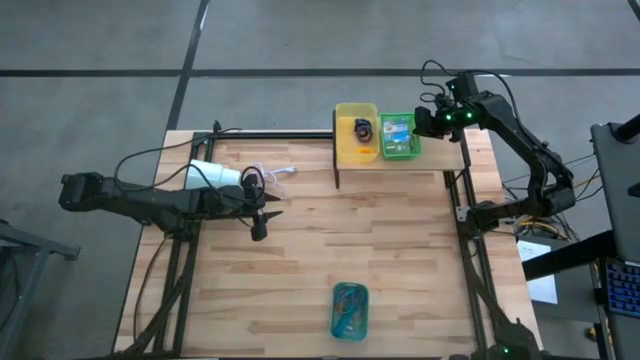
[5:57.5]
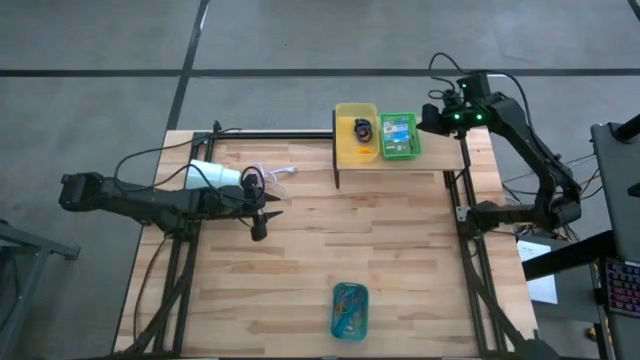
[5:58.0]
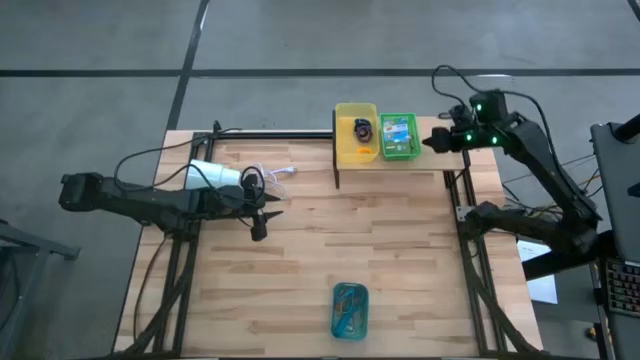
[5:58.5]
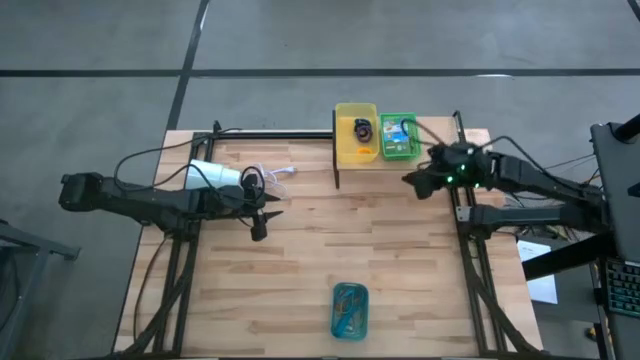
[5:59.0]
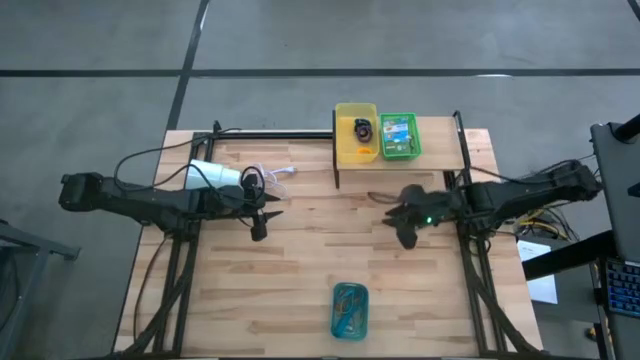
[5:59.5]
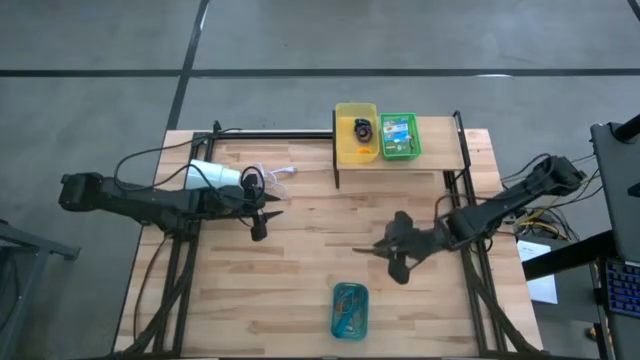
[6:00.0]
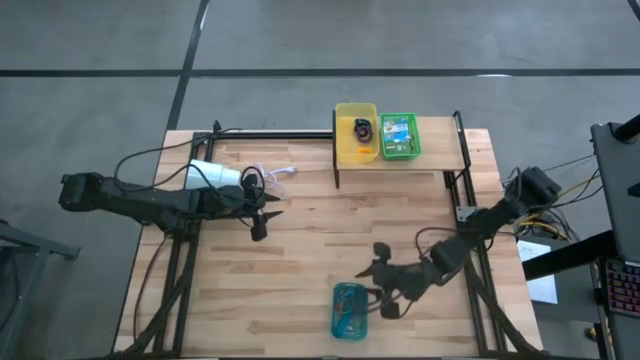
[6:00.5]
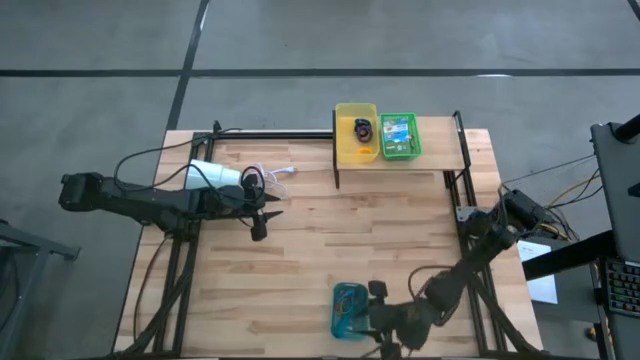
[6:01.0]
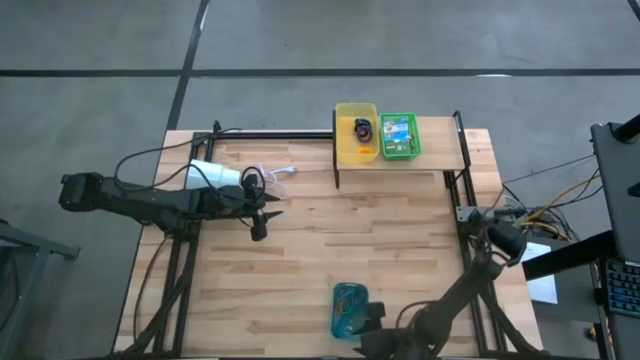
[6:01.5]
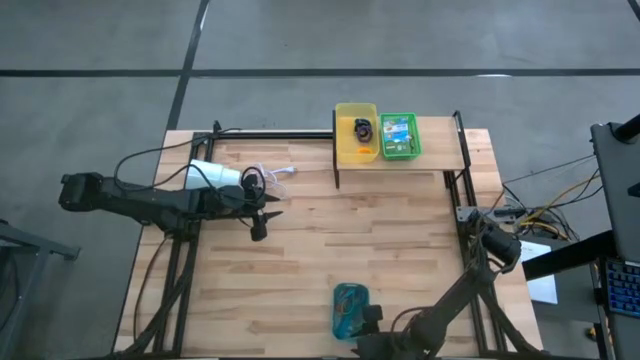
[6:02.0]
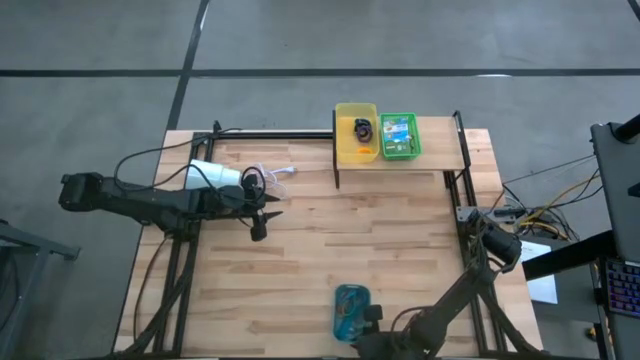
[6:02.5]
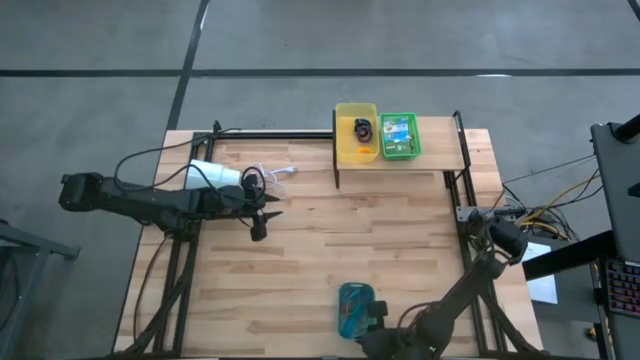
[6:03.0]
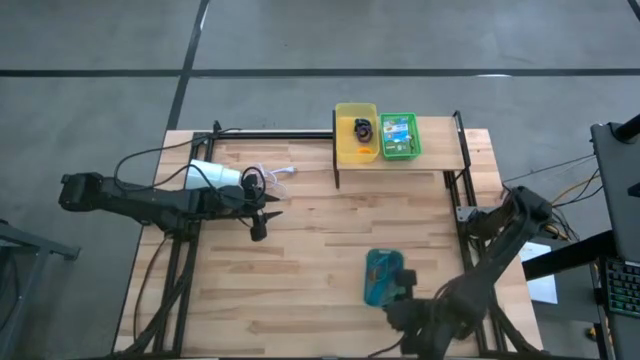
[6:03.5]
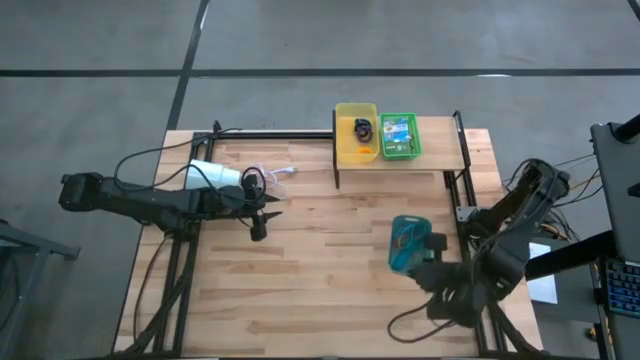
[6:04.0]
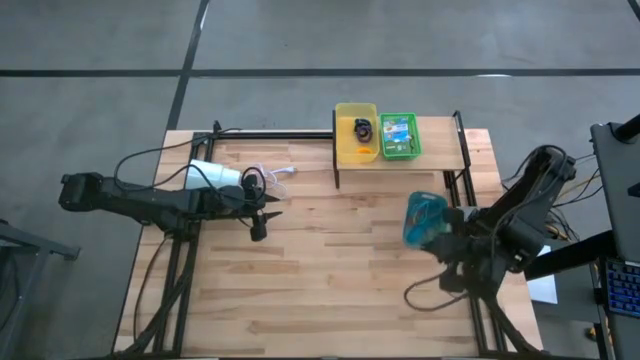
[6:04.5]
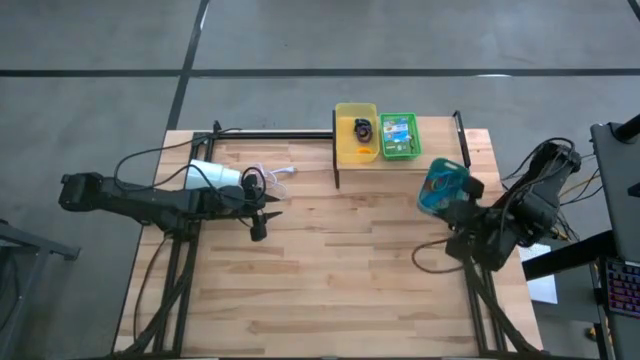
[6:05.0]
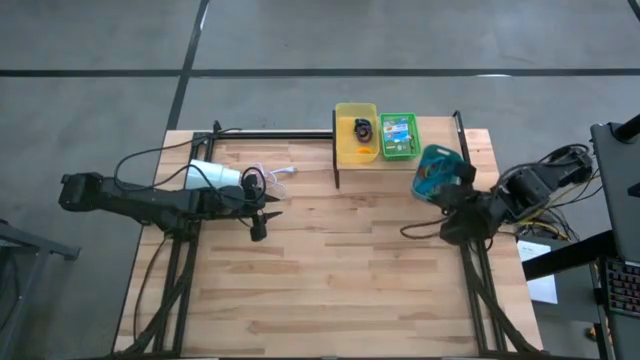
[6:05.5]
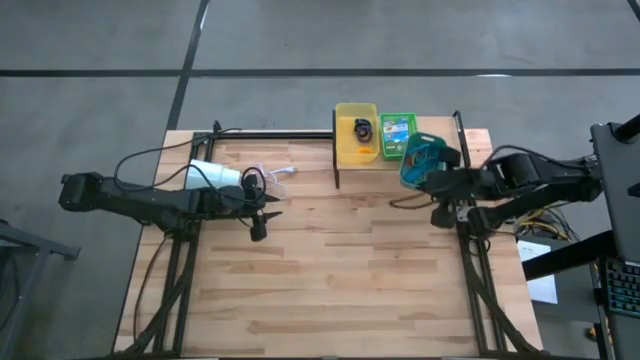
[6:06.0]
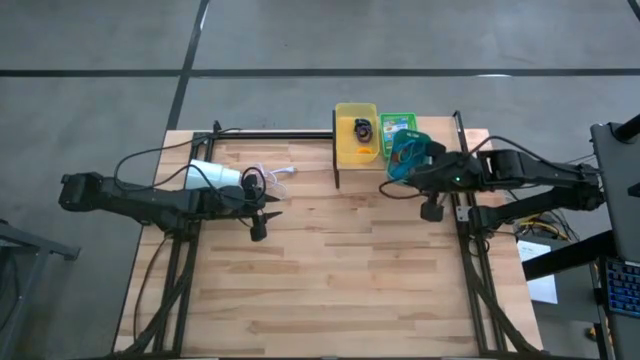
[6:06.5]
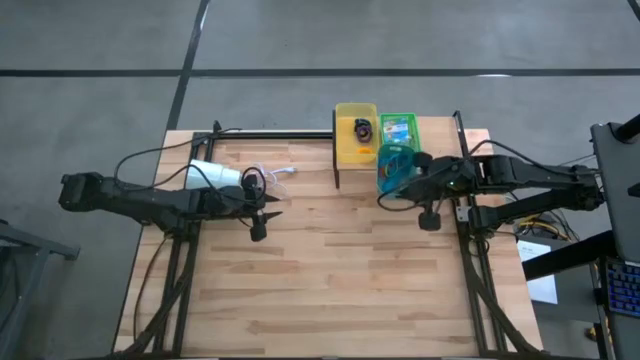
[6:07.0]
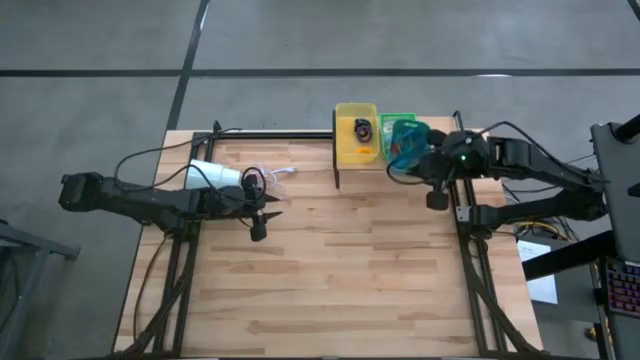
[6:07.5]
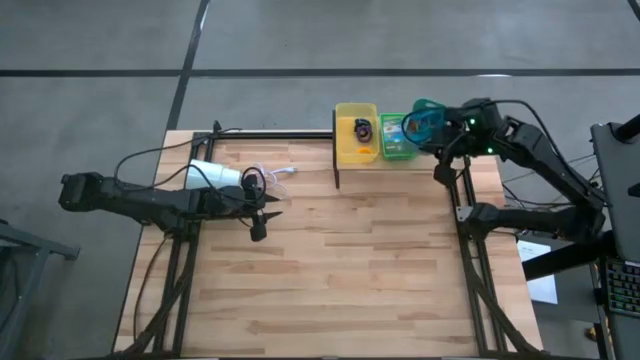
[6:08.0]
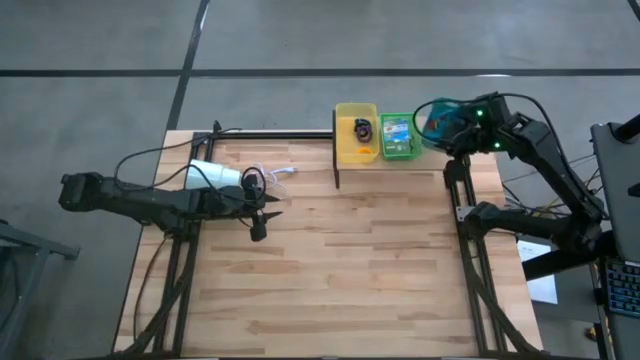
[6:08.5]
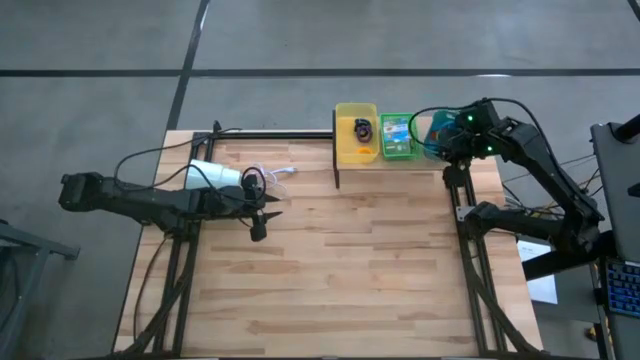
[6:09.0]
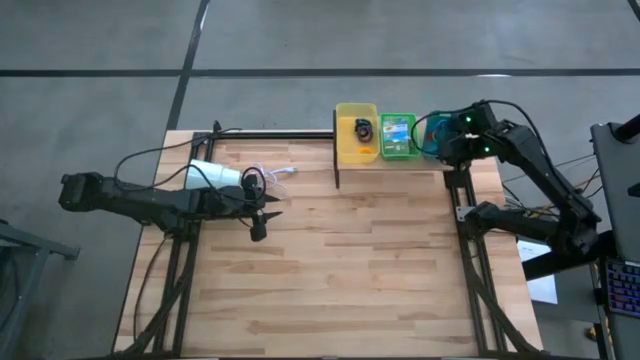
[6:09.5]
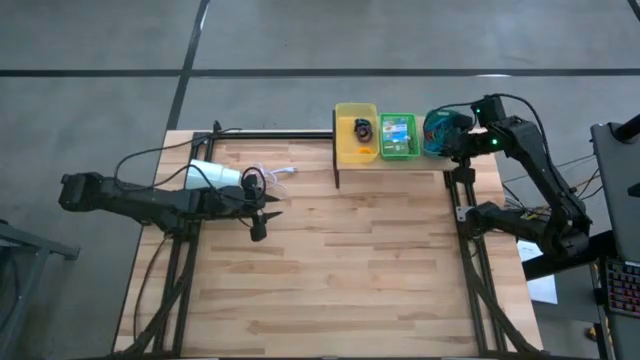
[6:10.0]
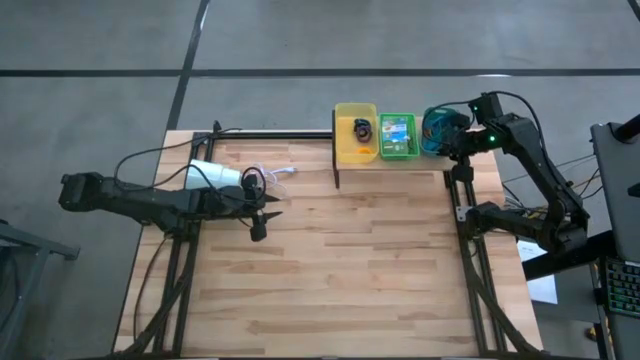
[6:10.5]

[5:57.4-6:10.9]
Task: Pick & Place Office Desk Supplies
Put the blue bin on the shelf

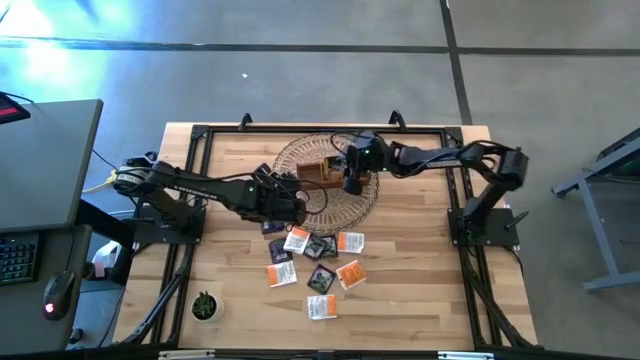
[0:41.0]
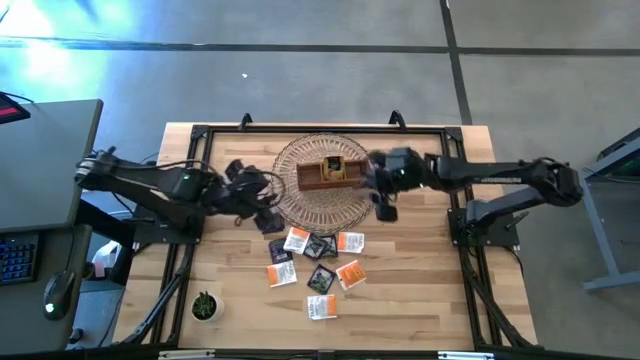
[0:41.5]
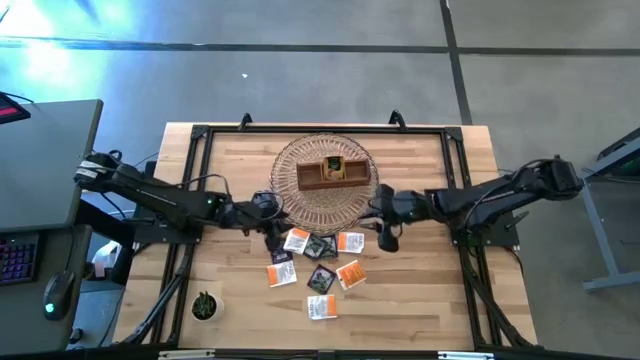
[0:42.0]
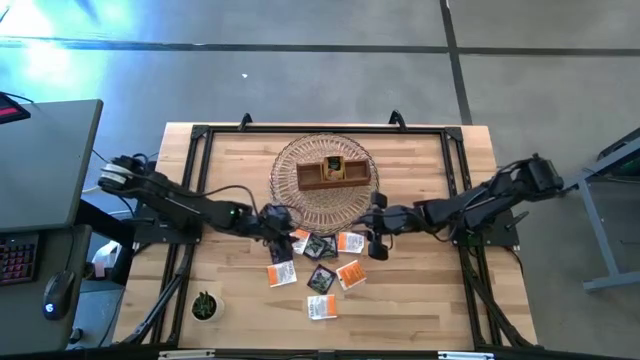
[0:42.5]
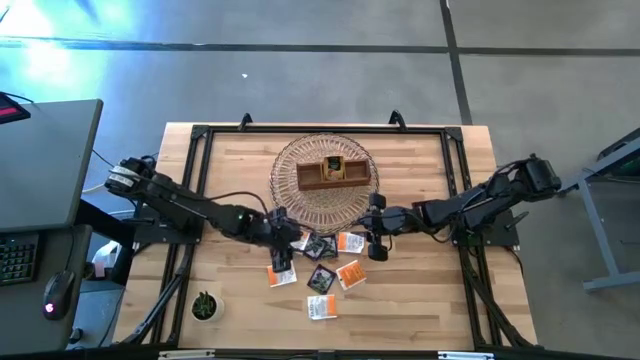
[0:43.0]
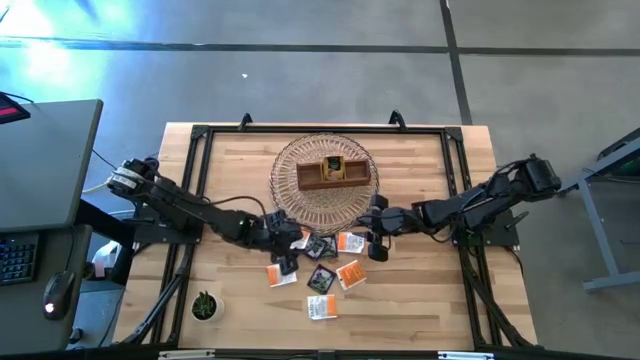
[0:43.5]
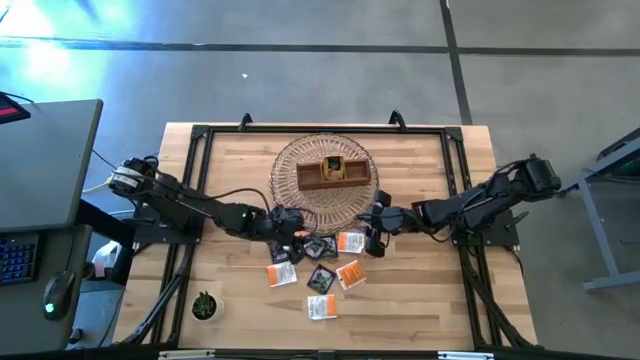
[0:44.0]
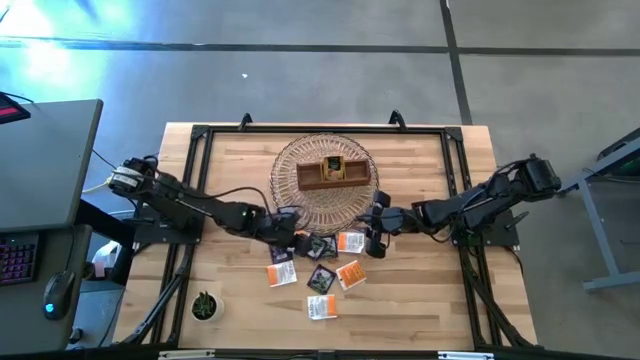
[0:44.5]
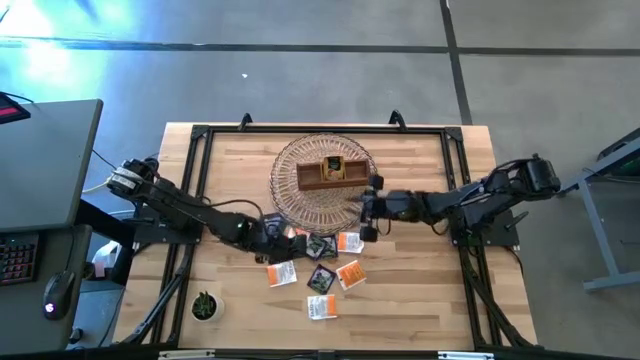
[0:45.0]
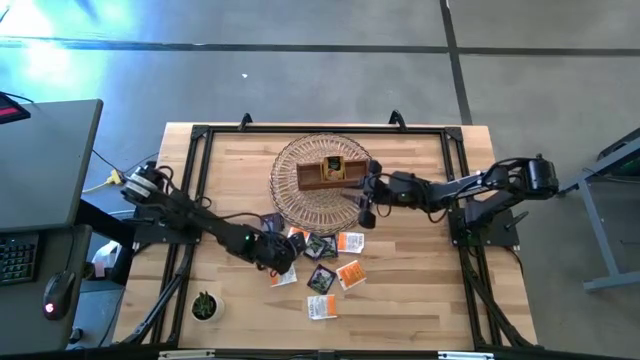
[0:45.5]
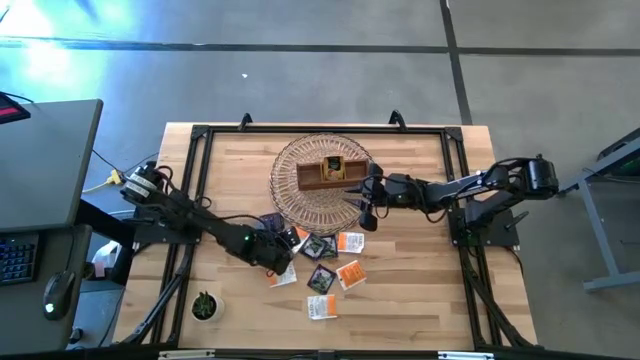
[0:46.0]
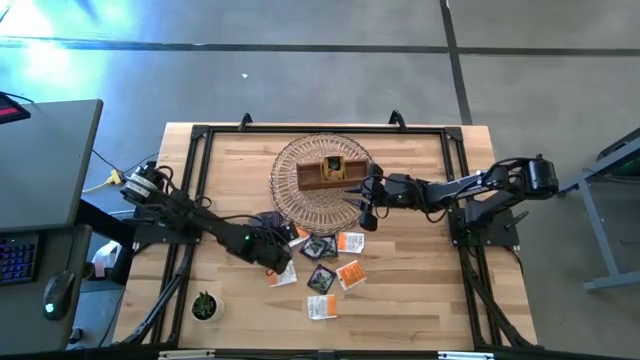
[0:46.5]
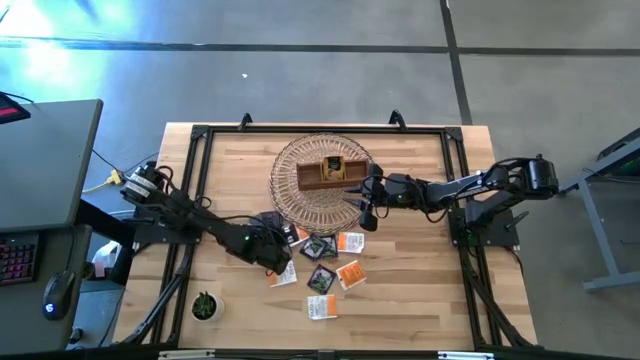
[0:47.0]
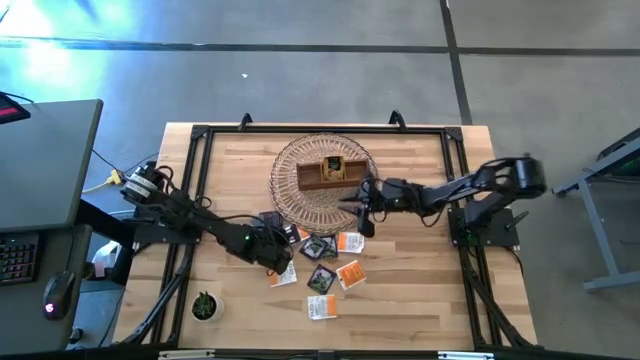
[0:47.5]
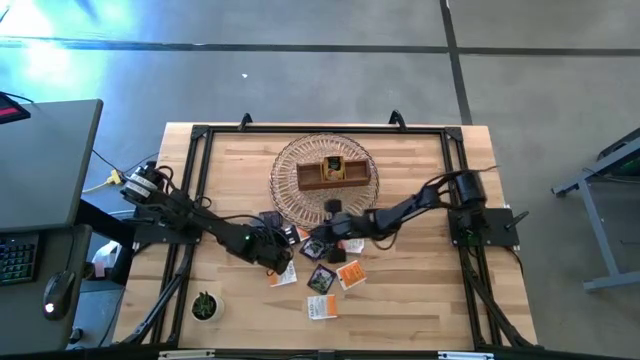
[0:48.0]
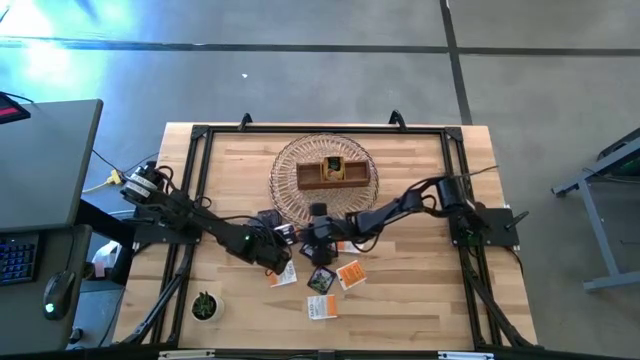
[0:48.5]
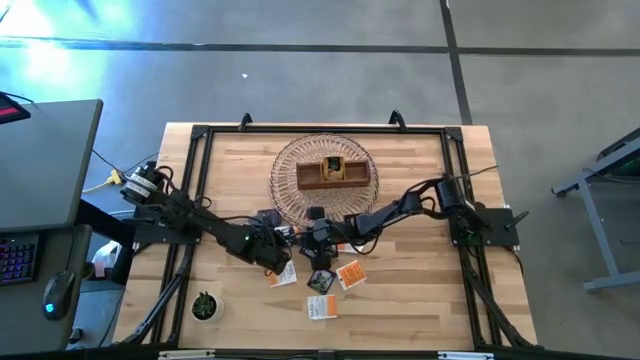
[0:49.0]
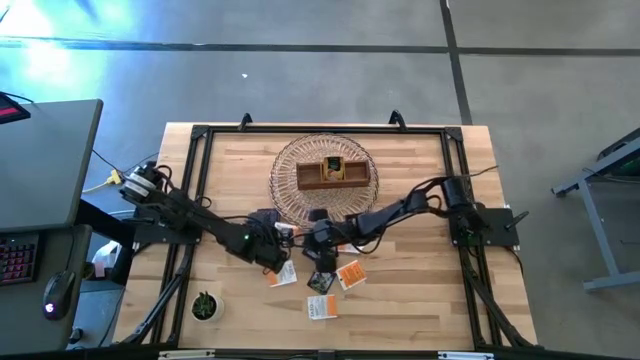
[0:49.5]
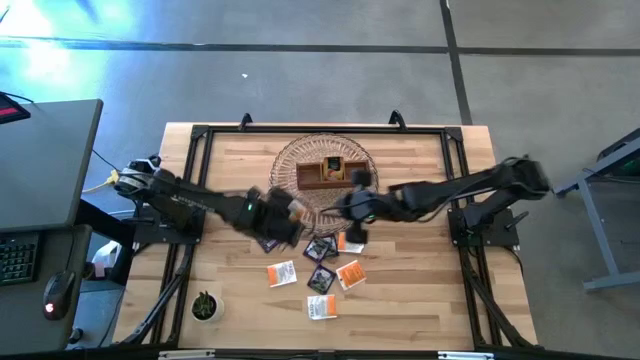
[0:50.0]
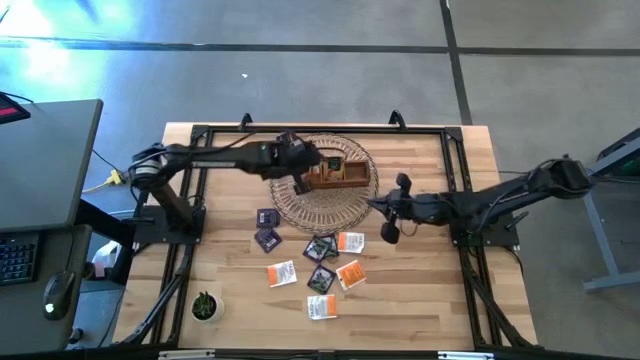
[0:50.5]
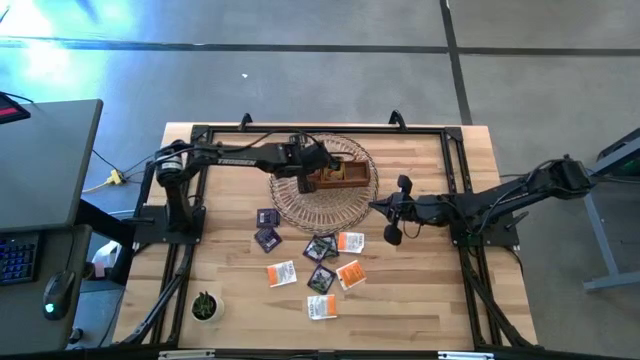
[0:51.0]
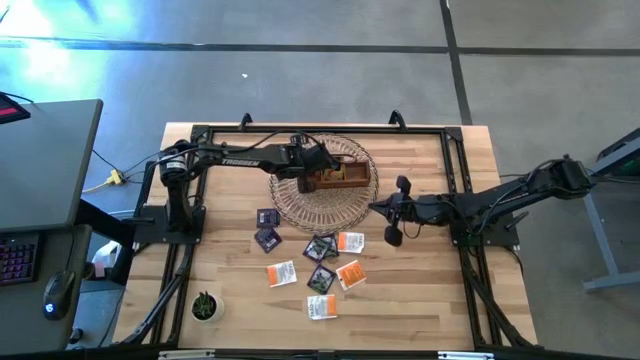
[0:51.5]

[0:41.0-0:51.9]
Task: Pick & Place Tea
Put the white tea bag into the left section of the wooden organizer
